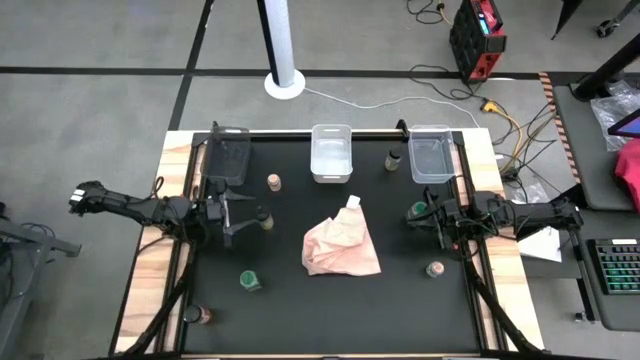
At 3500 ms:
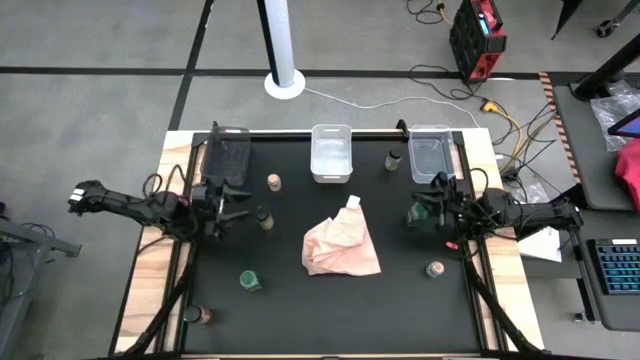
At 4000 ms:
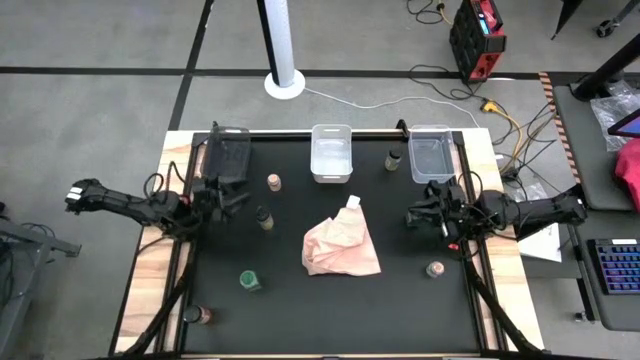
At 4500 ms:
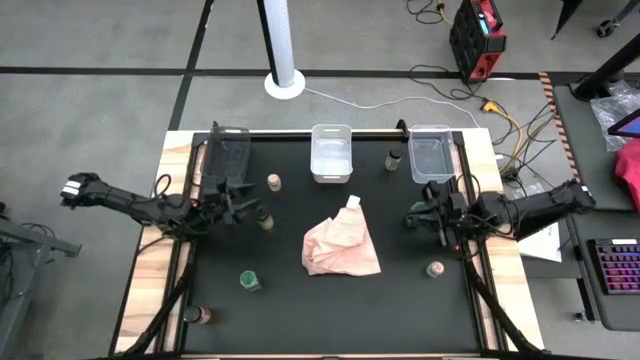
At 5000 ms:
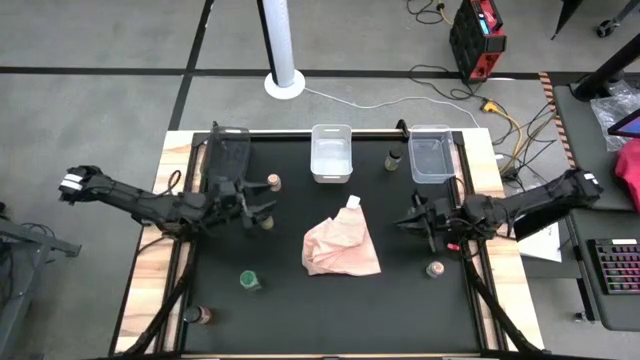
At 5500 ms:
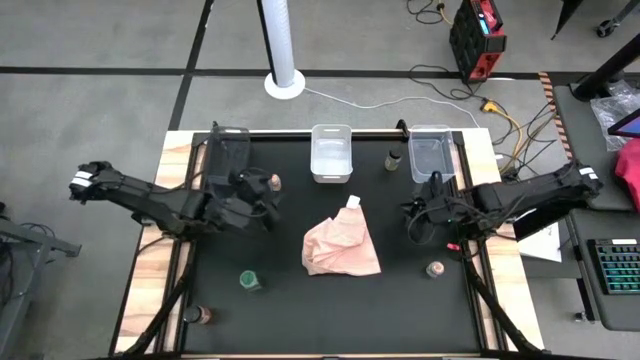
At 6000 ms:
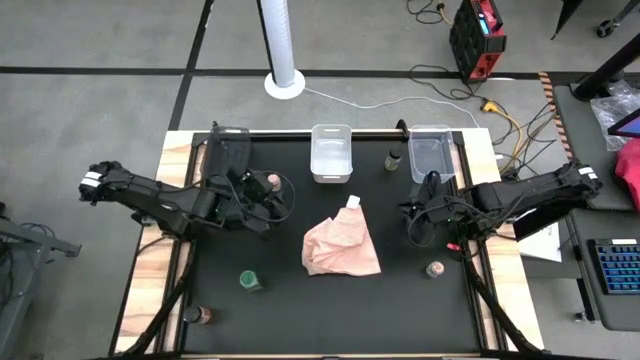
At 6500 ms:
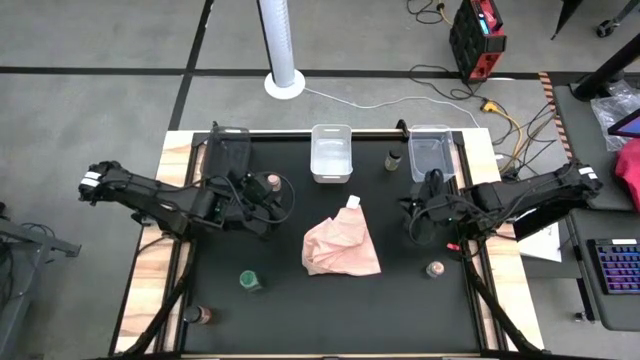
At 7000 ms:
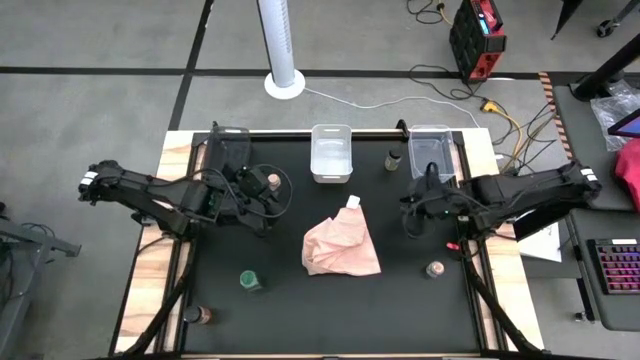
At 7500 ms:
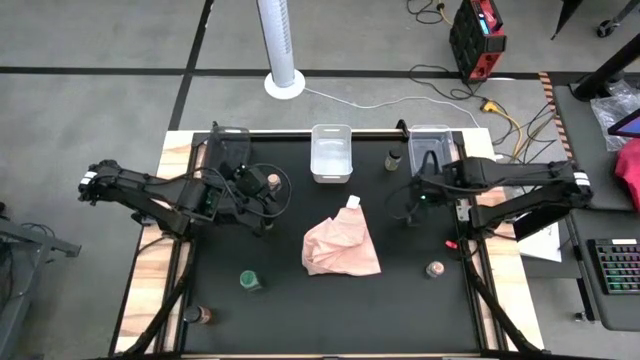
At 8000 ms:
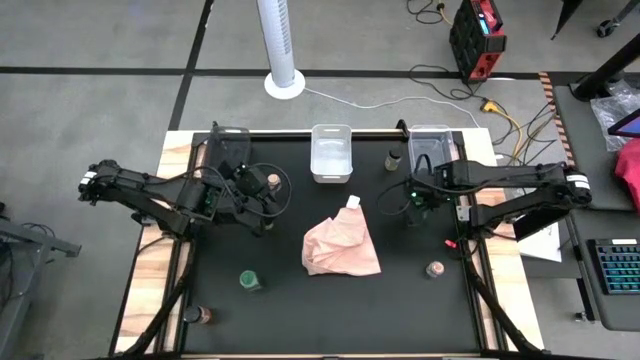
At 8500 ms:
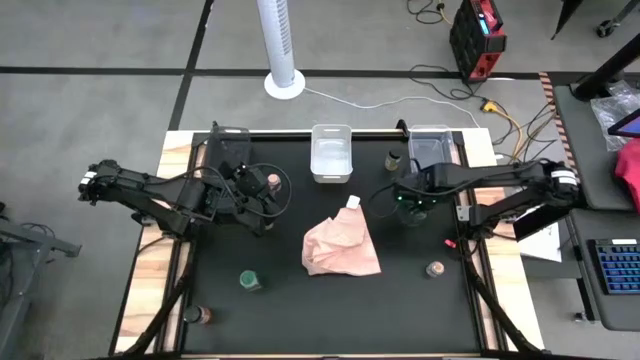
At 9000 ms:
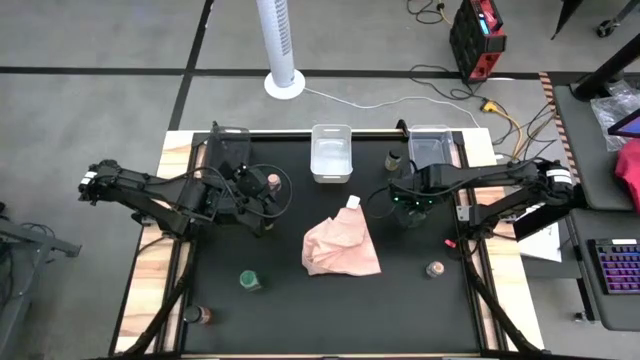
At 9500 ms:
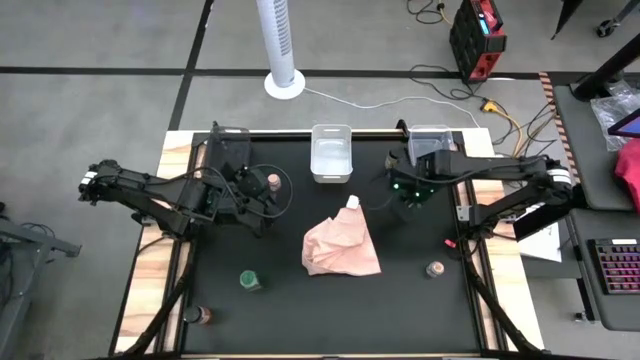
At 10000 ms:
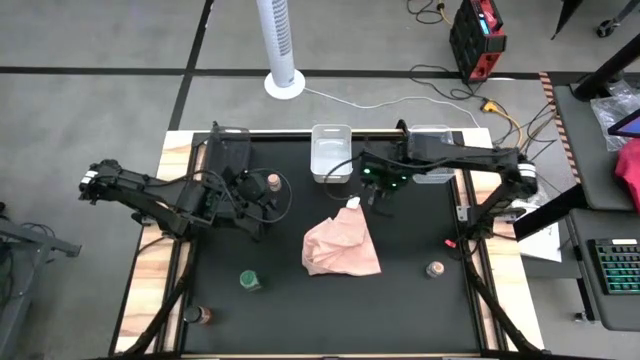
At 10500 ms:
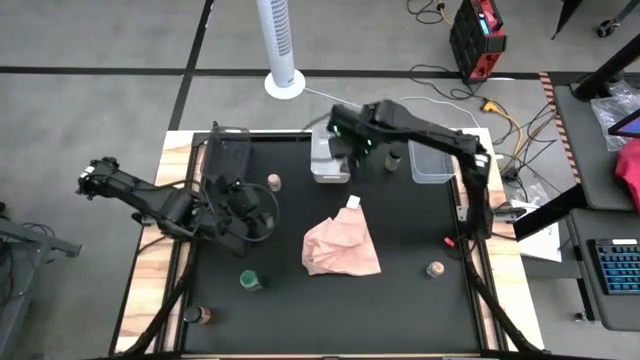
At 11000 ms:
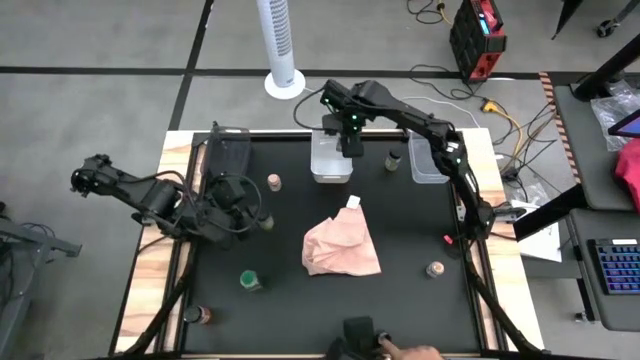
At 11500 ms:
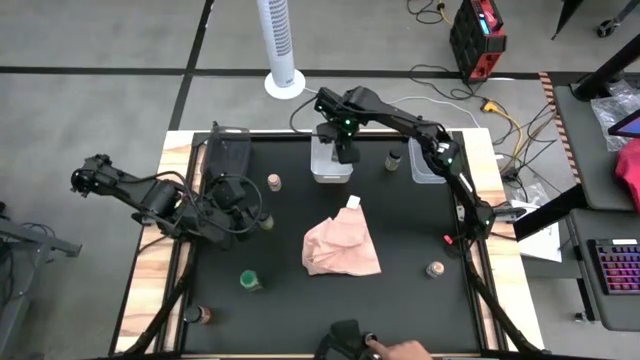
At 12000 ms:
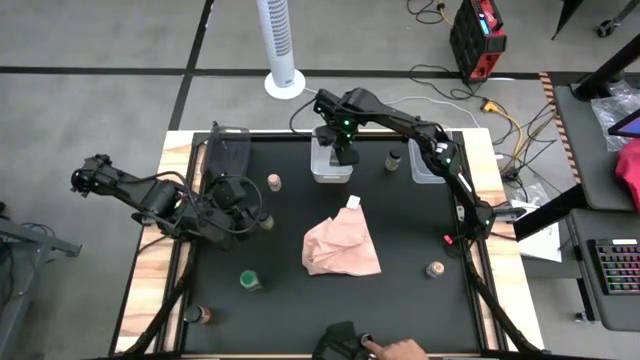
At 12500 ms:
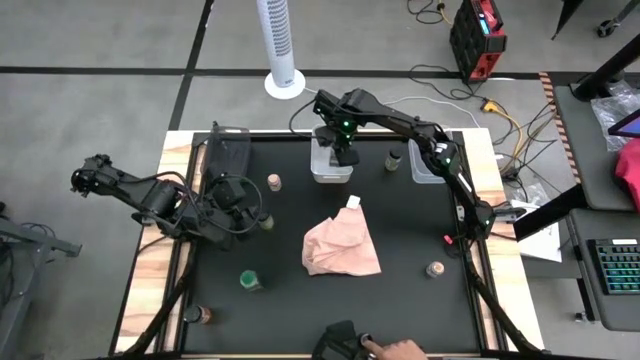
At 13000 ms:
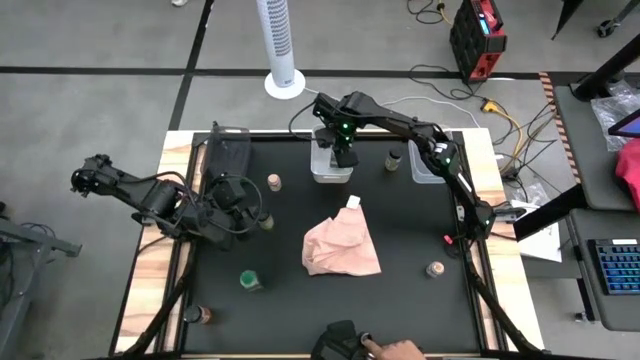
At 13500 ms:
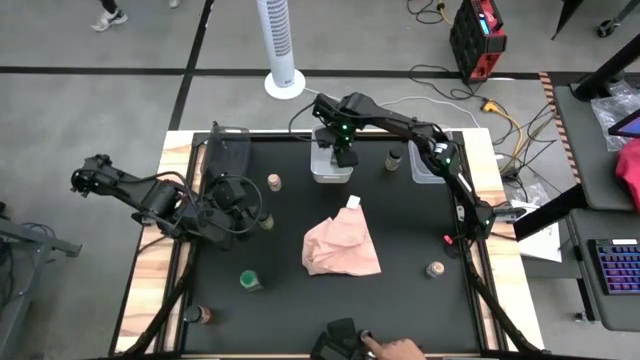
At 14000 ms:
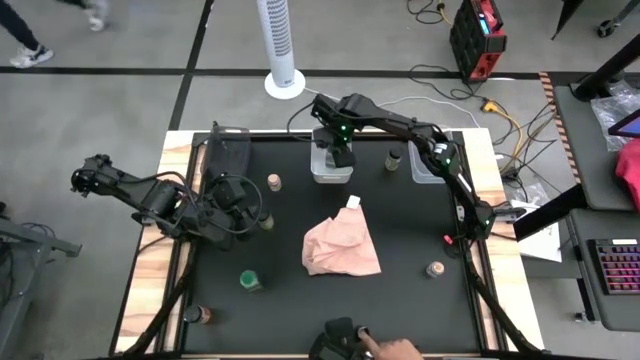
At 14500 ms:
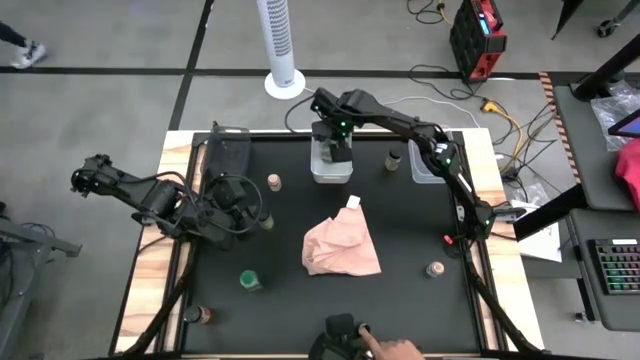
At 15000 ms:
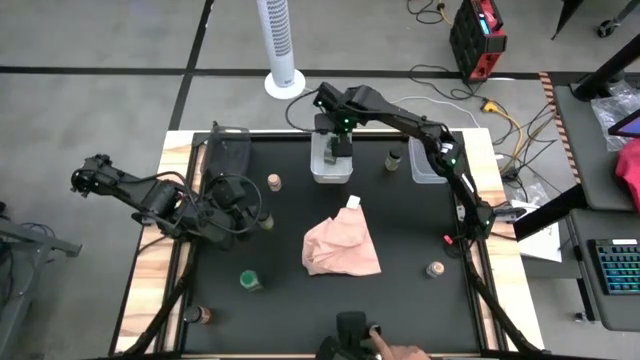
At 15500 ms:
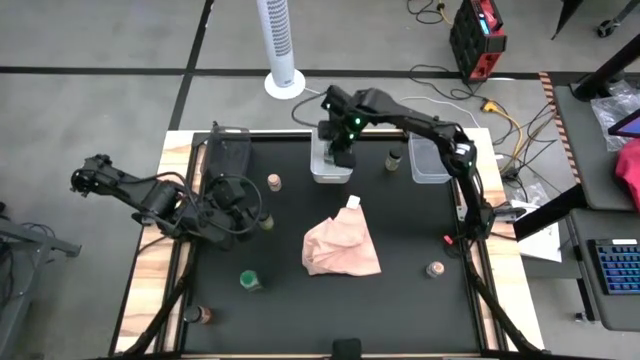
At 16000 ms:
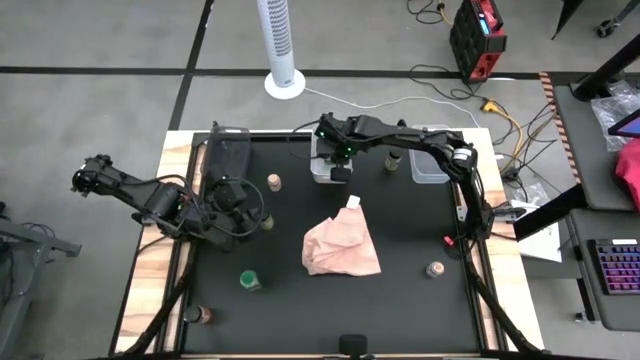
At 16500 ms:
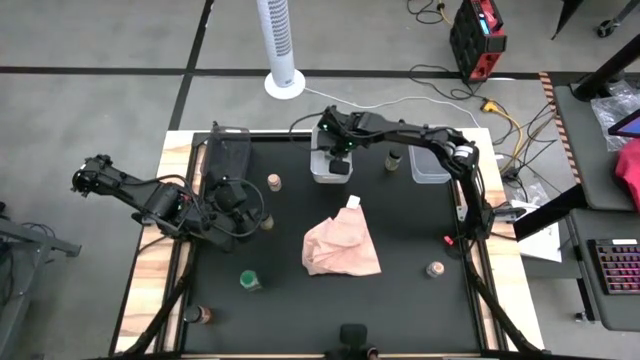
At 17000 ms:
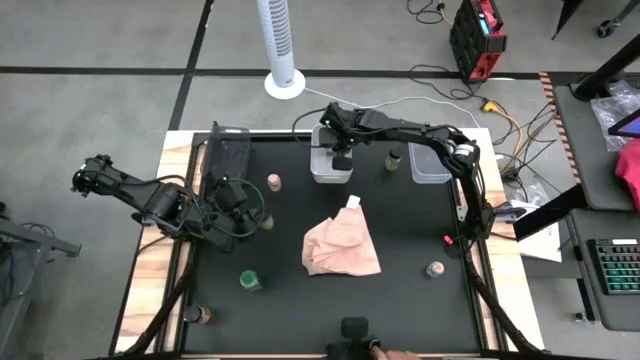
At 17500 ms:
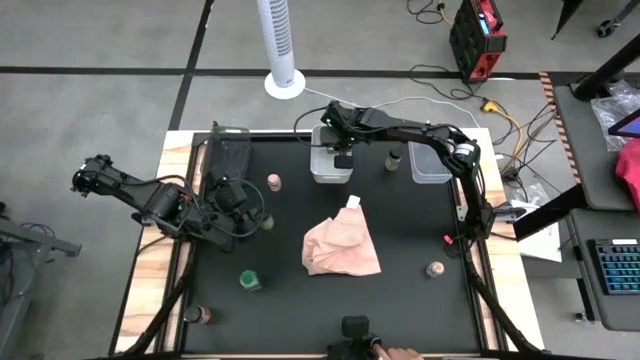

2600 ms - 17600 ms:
Task: Sort spices by type
Put the right green spice bottle into the white bin
